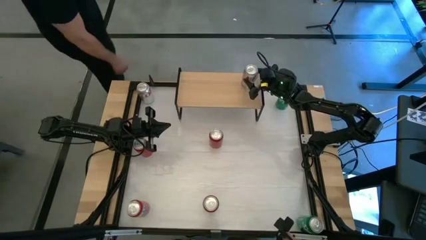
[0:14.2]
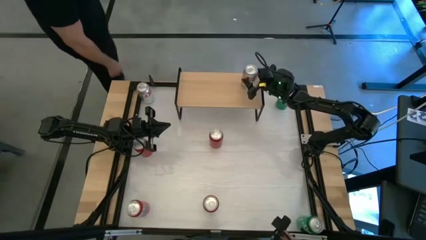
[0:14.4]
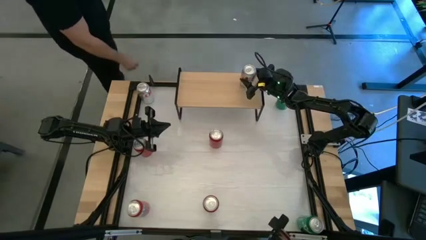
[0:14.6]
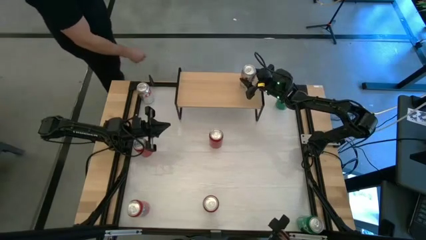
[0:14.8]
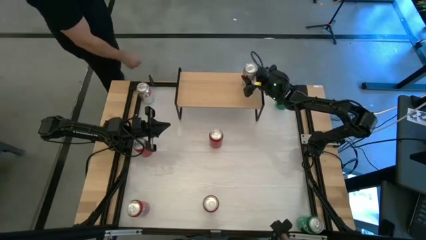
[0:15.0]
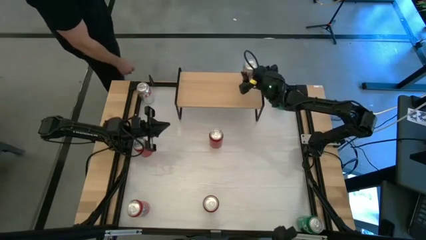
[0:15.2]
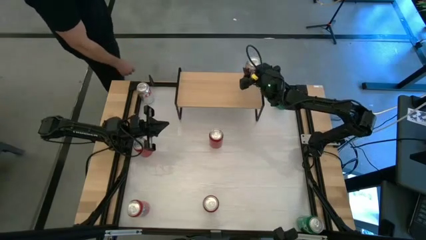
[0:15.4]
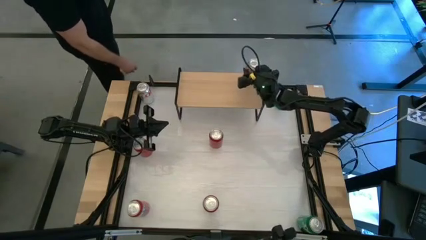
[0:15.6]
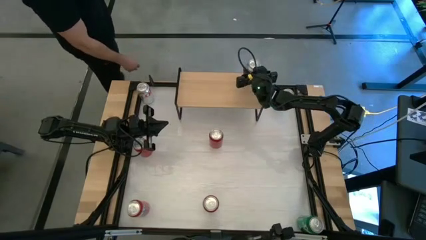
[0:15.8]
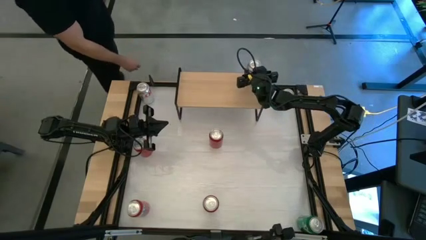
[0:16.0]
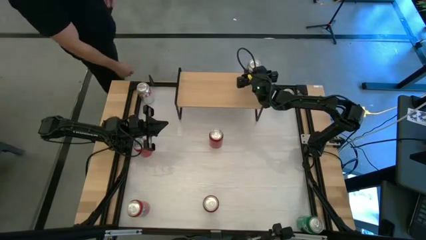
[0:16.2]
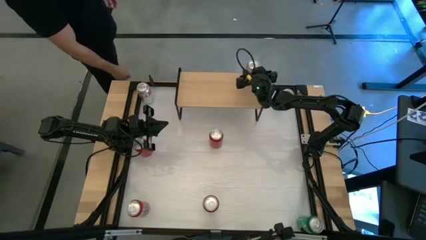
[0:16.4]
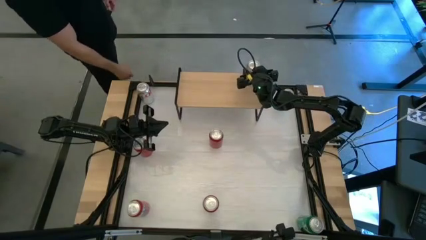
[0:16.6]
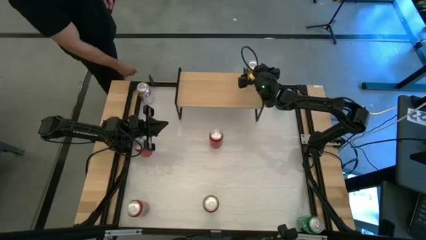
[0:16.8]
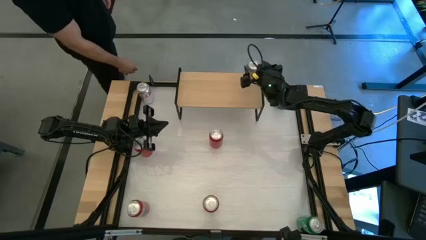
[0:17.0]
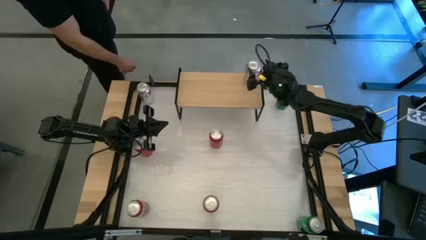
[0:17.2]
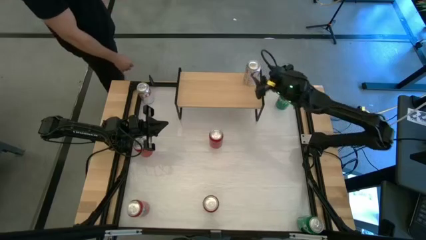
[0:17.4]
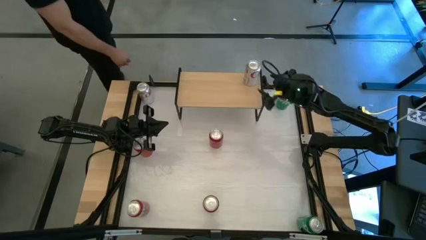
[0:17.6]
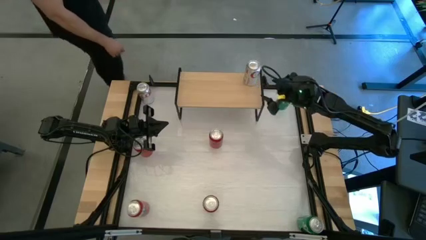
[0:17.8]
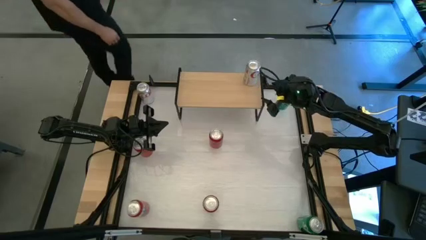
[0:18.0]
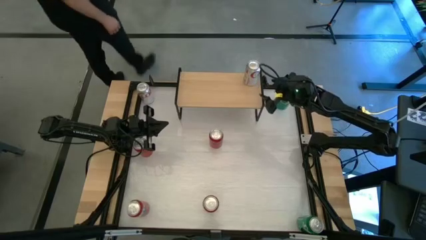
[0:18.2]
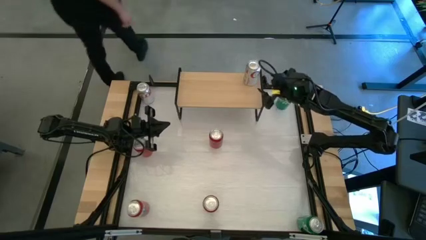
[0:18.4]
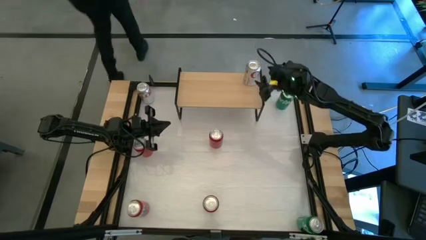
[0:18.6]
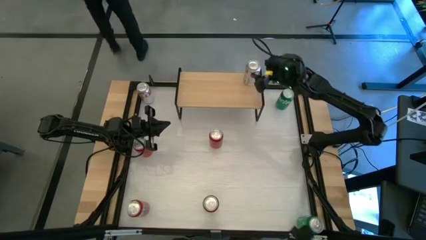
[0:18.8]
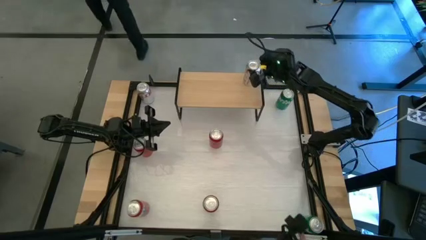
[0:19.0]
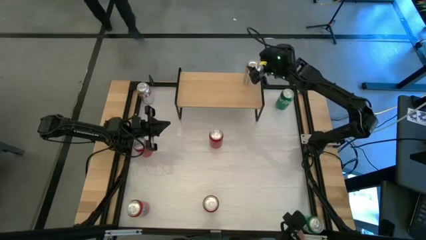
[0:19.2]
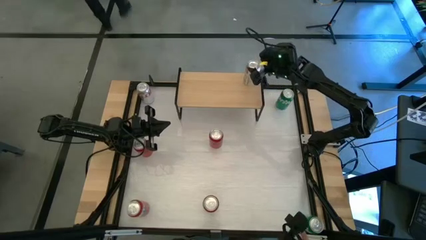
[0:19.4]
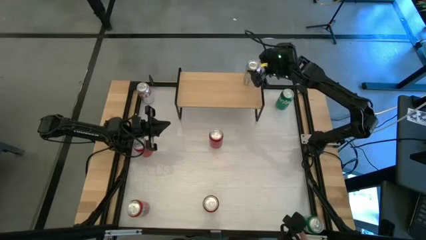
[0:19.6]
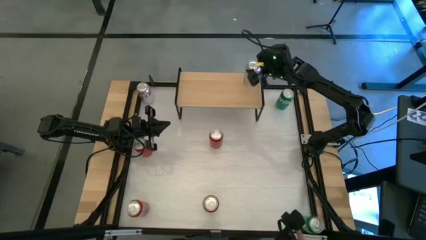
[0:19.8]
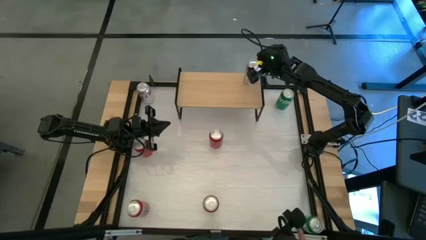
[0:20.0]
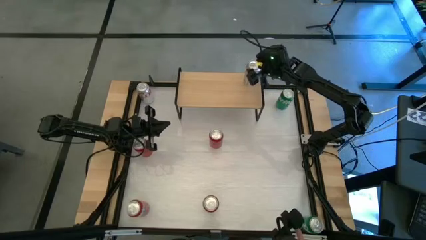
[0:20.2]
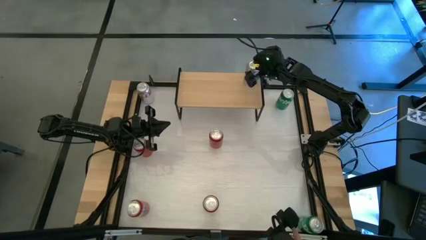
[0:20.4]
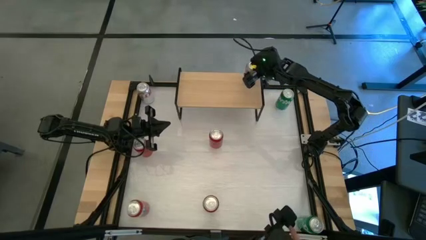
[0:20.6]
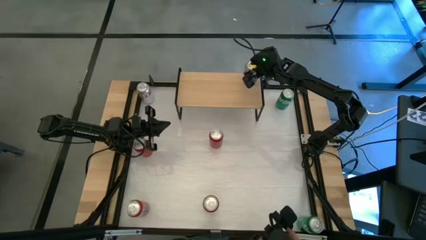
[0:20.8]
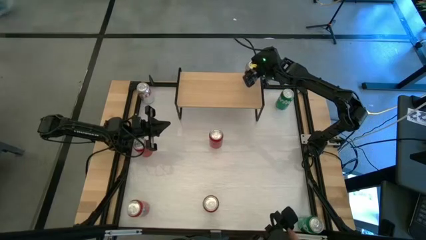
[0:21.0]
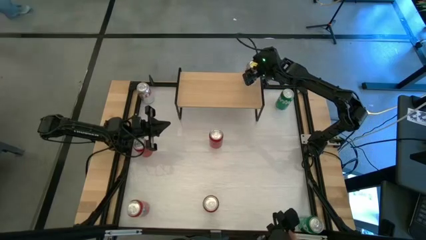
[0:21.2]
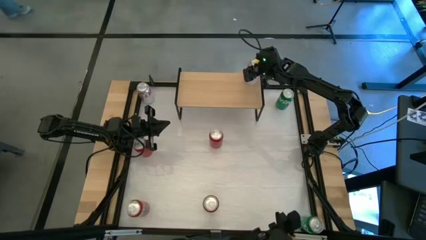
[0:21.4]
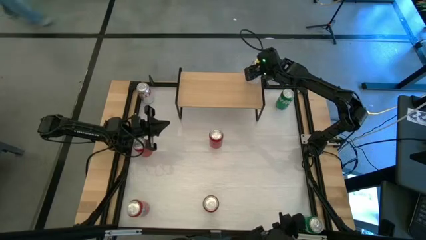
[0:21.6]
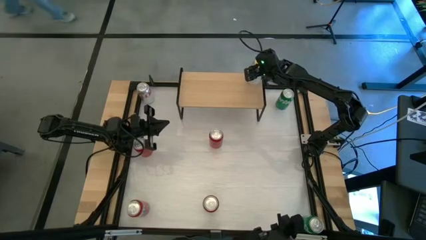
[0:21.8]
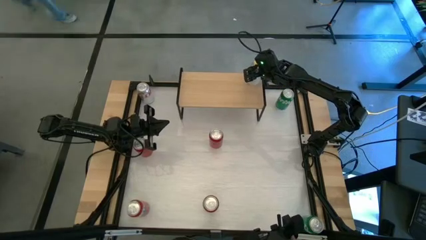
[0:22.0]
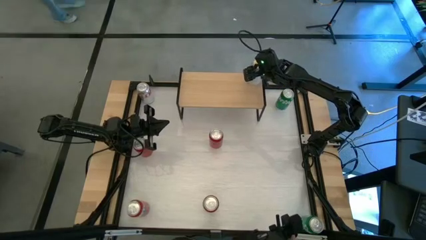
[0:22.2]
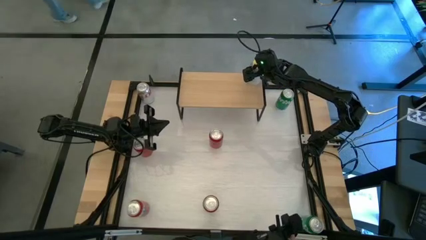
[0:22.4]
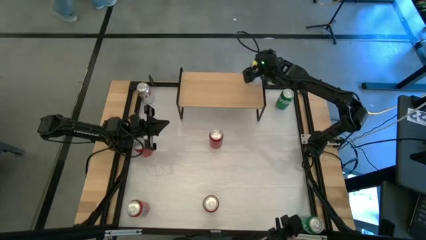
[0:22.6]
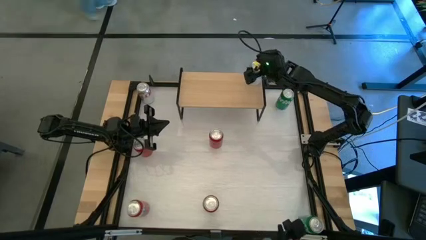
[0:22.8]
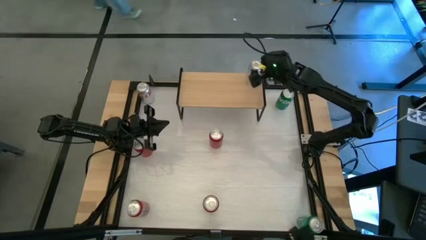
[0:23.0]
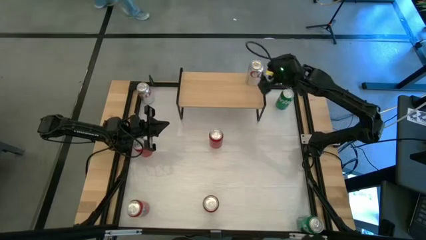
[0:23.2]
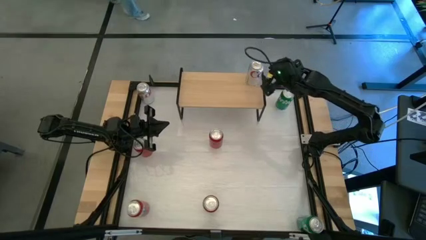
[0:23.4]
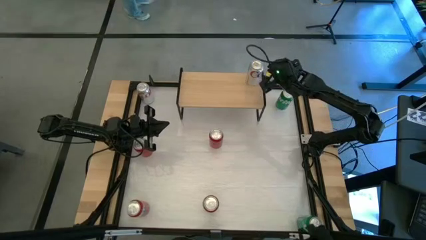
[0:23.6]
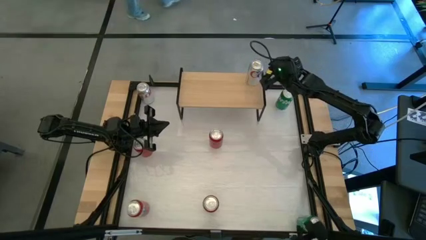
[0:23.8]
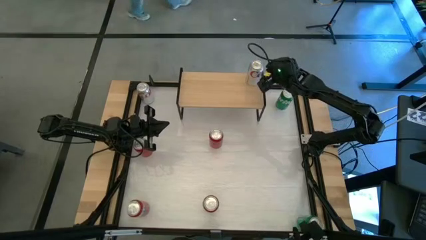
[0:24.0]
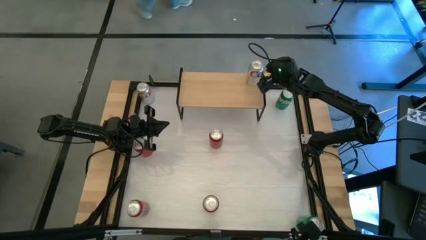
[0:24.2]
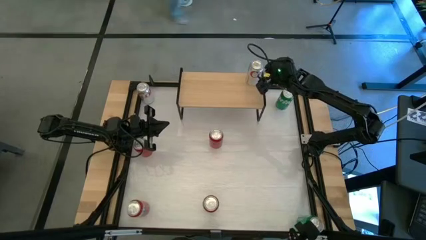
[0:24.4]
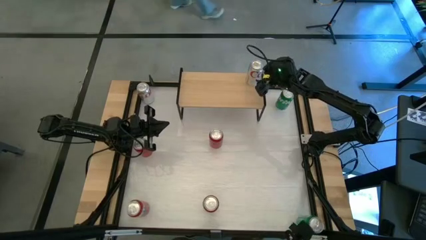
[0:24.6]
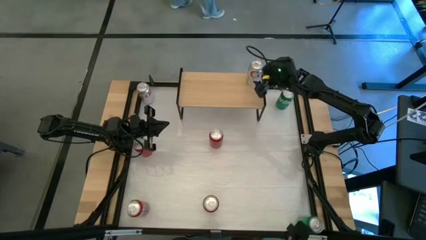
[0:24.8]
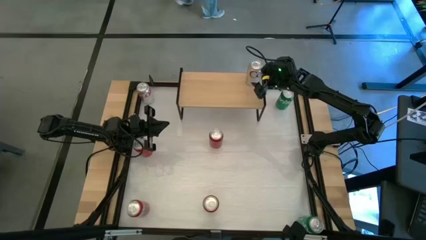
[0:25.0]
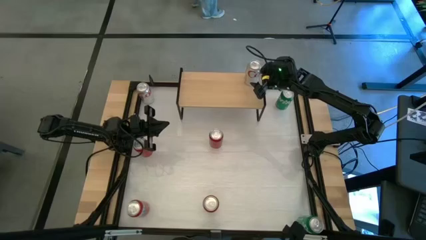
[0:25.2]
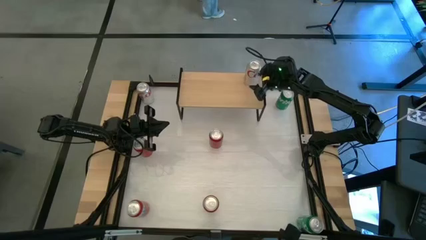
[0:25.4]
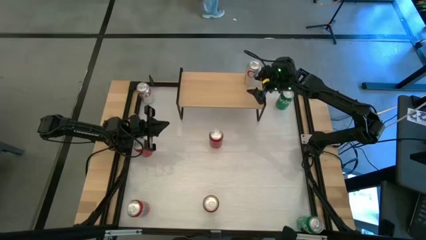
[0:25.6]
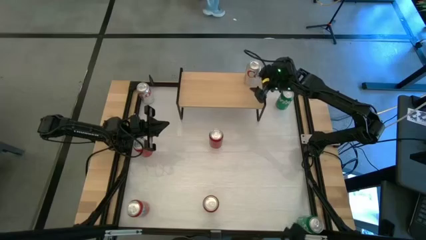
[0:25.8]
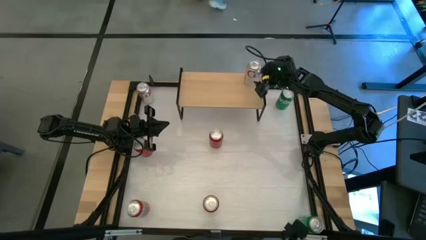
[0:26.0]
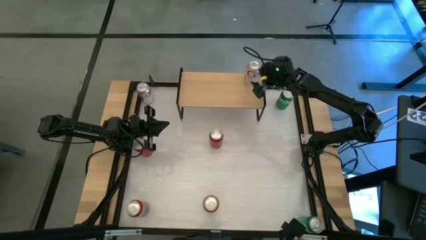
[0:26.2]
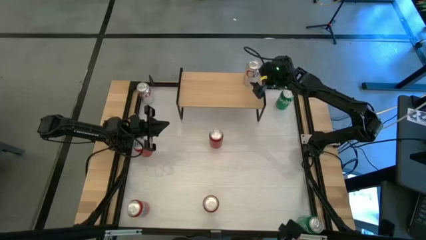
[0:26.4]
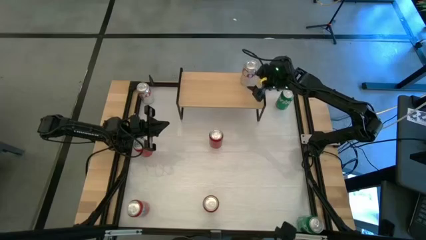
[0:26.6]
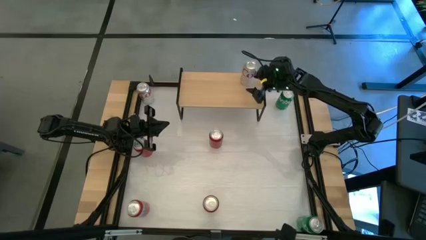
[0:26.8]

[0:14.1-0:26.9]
Task: Place canned beverage on shelf
Put the right white soda can on the shelf
